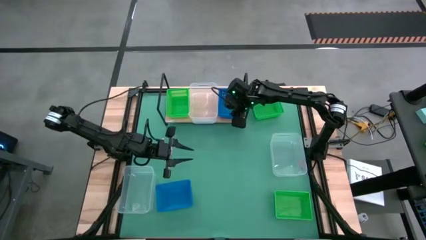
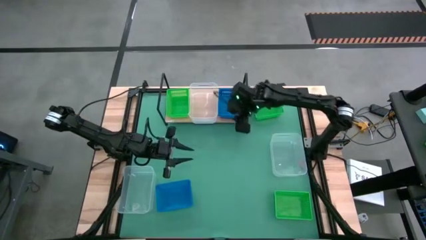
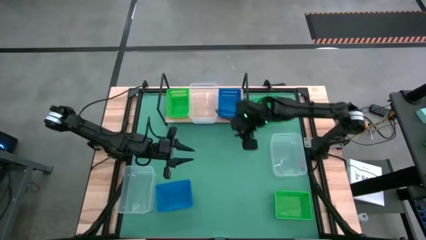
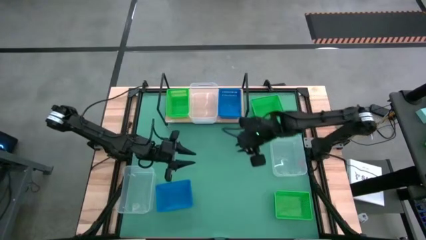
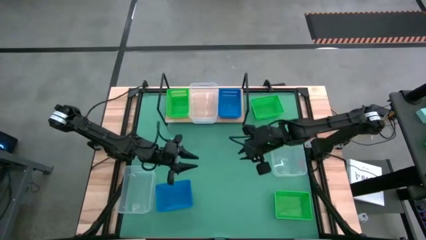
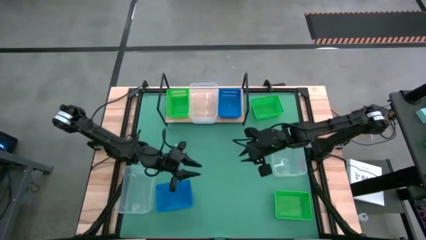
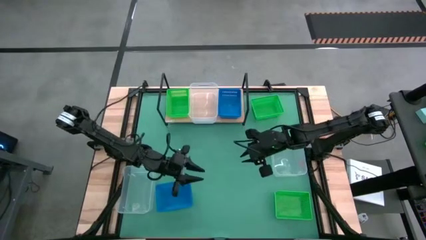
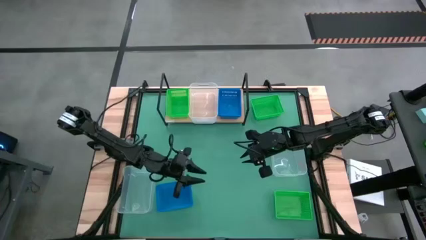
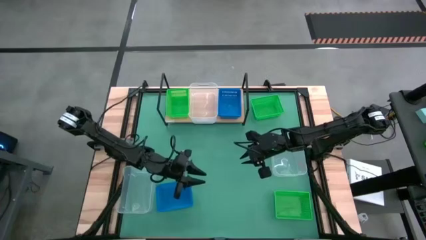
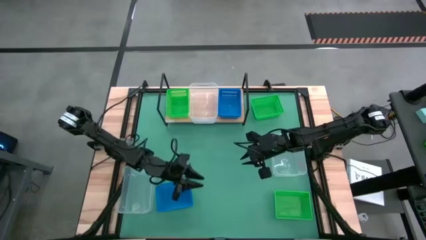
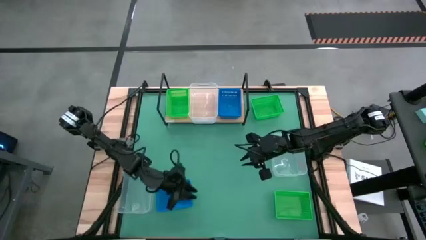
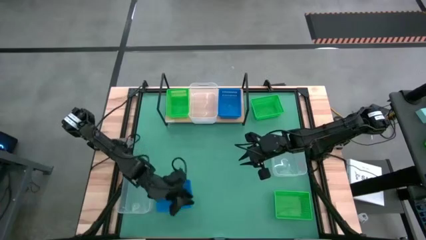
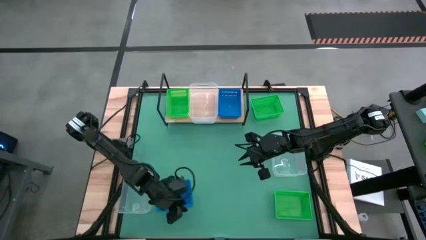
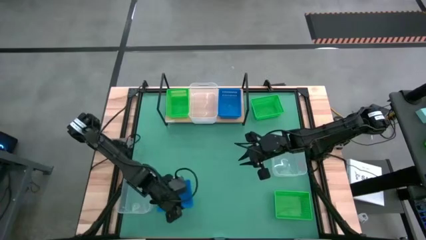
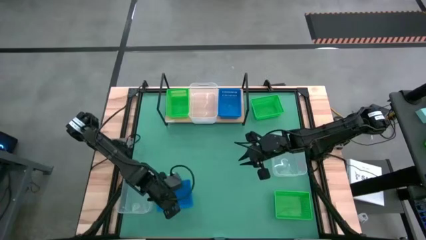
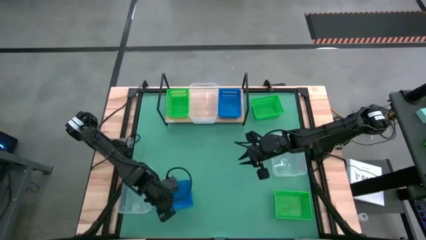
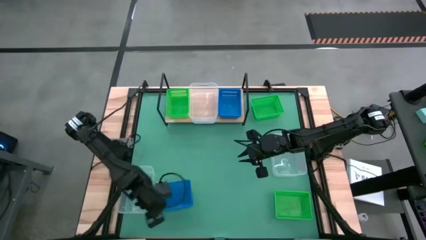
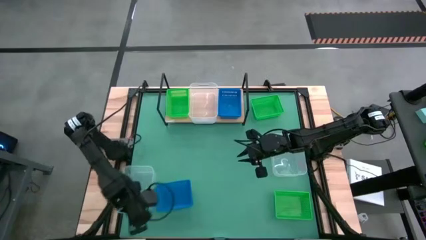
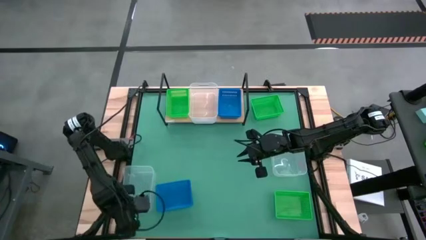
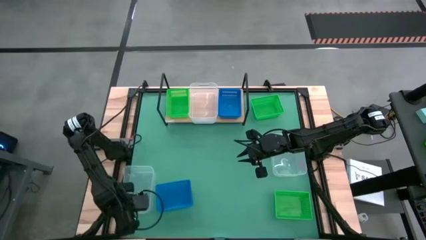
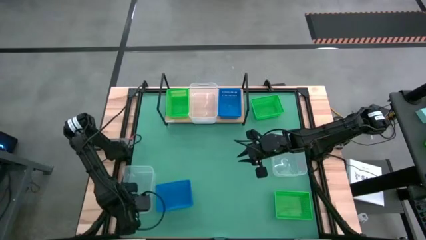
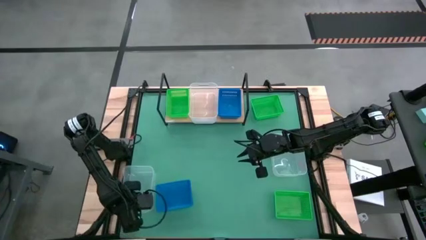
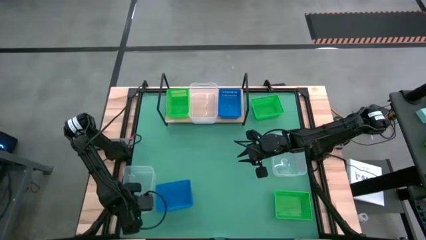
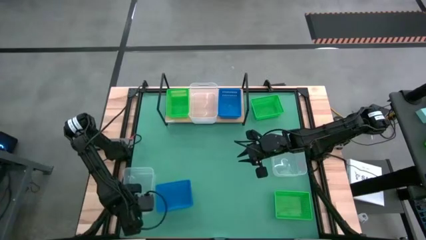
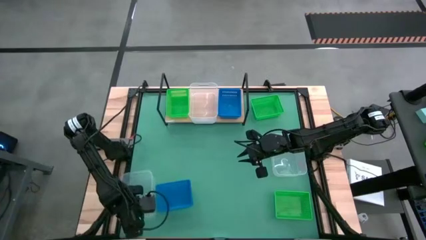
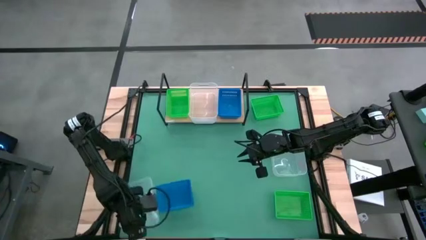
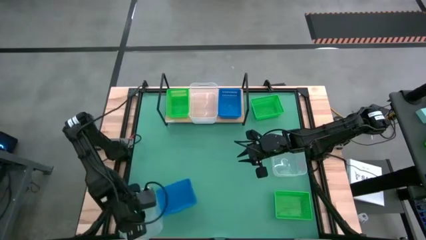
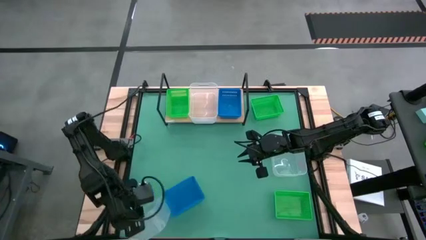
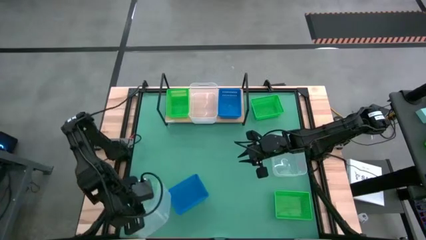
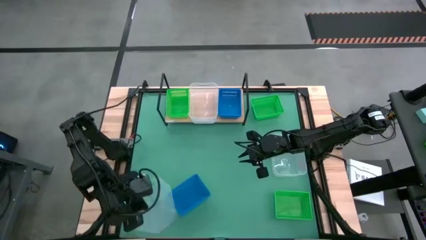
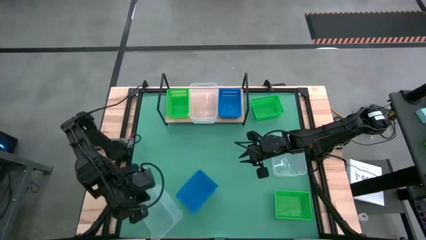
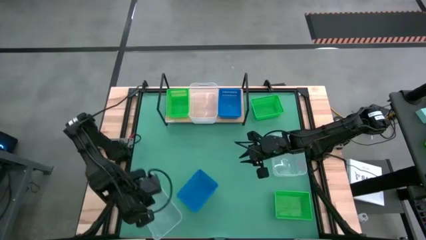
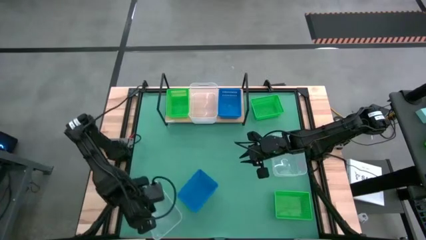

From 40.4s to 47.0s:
Task: Stack baskets on shelf by color
Stack the left transparent bin on the transparent bin on the shelf

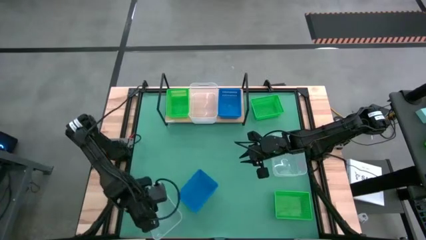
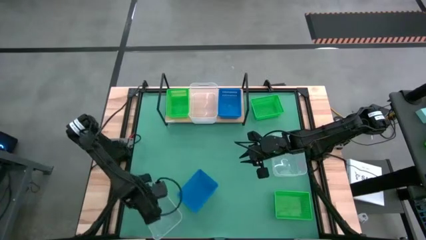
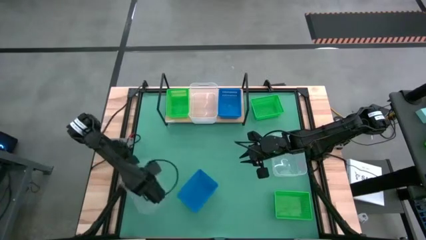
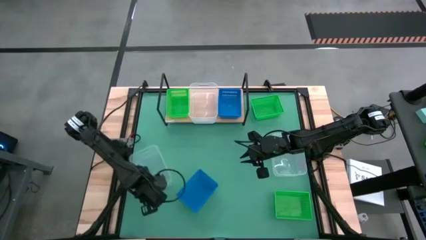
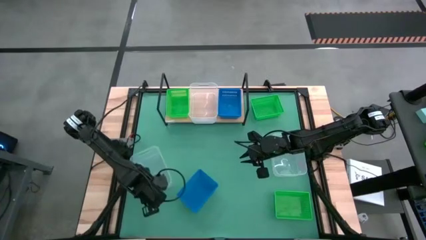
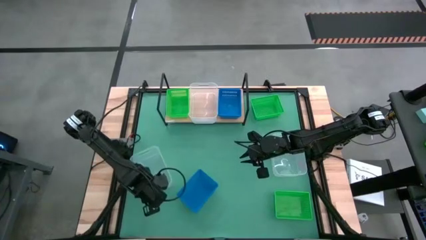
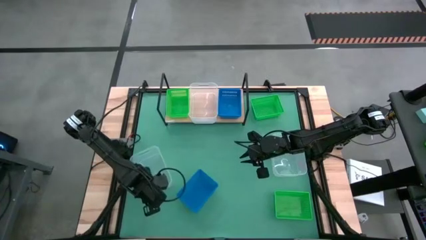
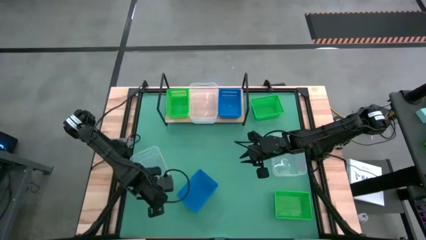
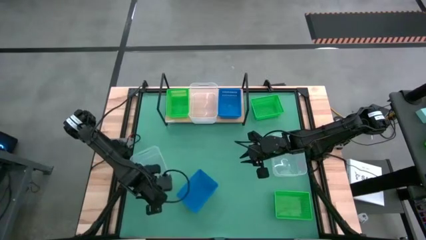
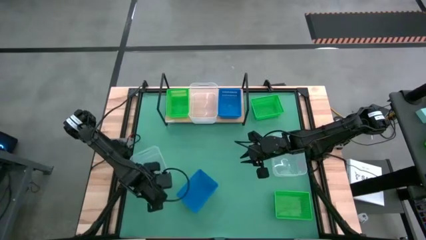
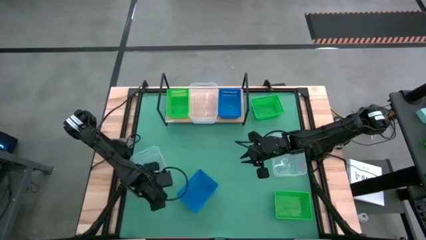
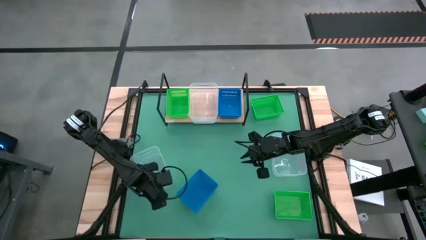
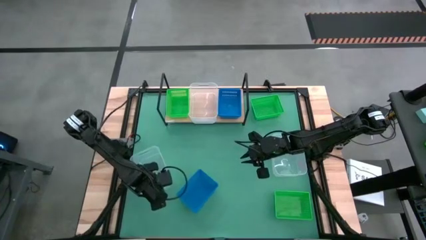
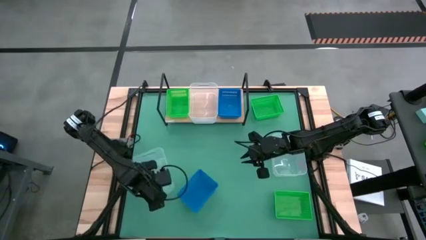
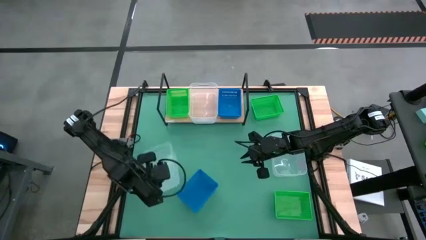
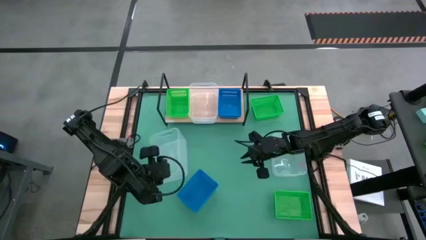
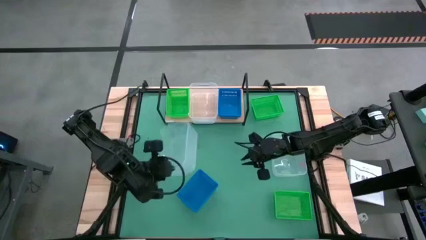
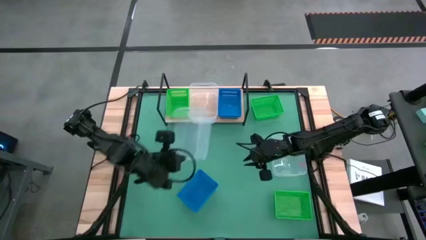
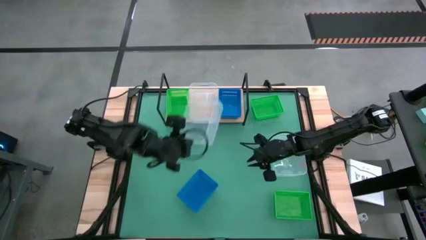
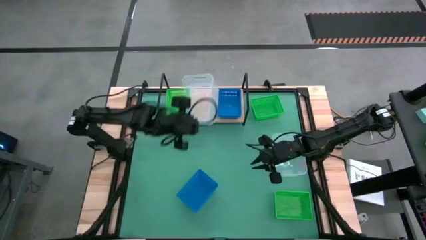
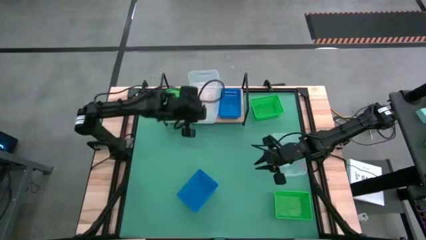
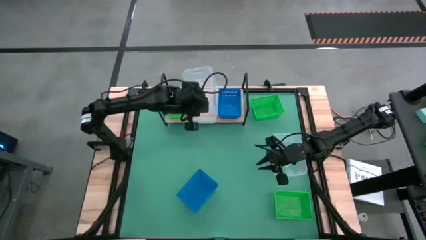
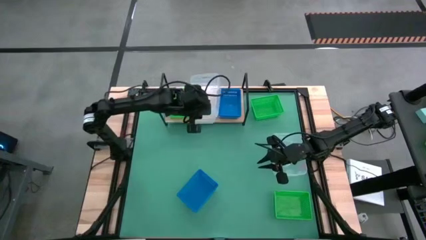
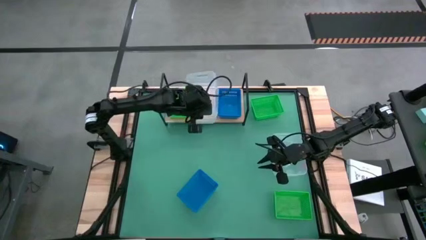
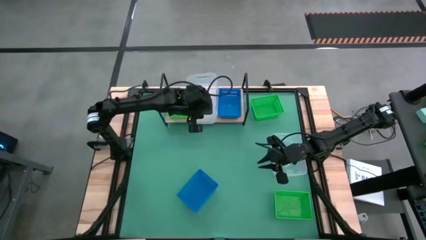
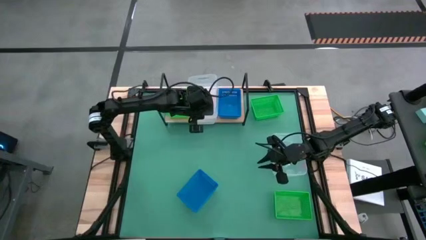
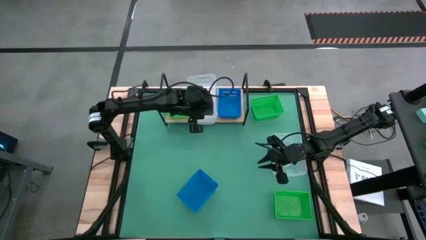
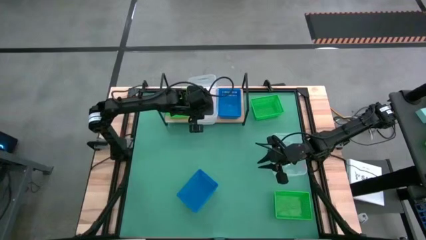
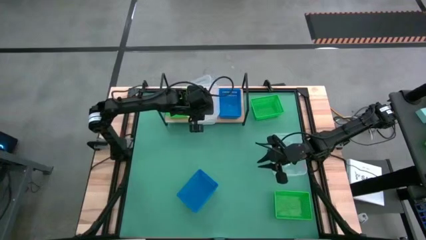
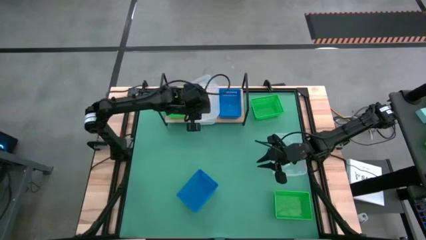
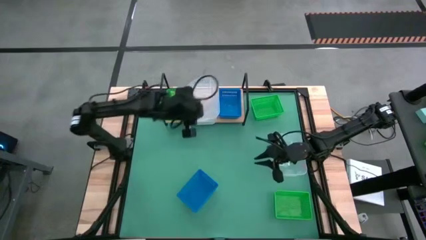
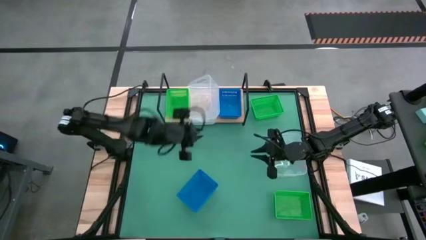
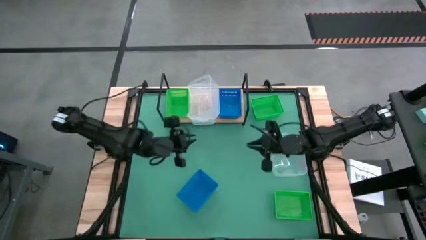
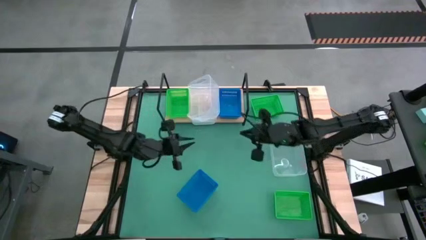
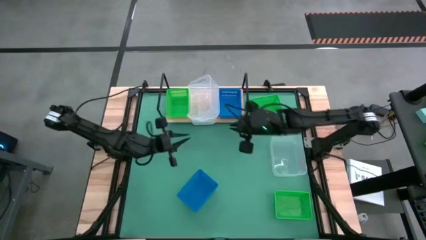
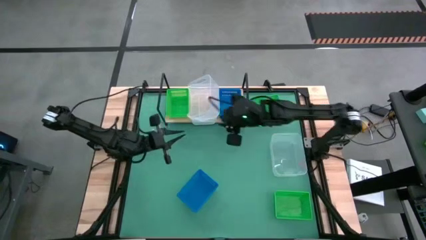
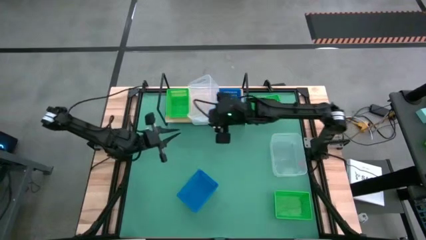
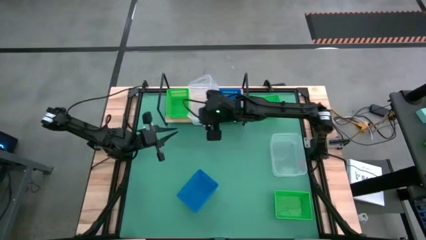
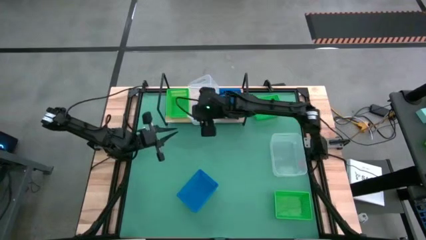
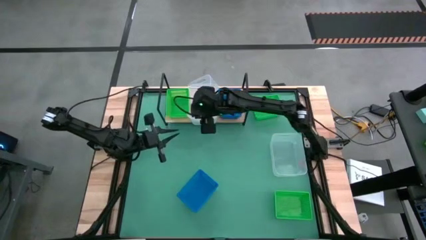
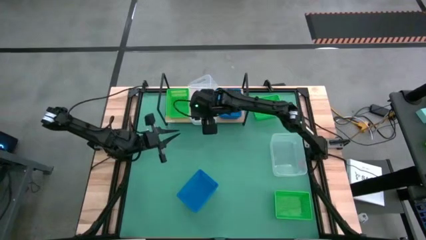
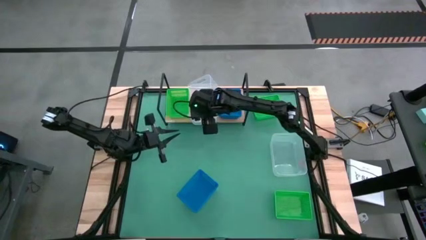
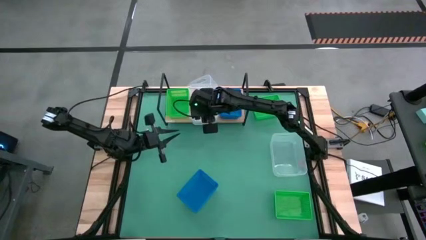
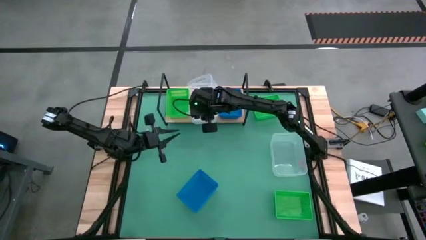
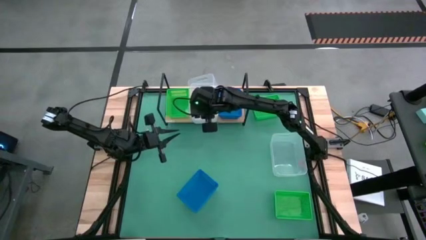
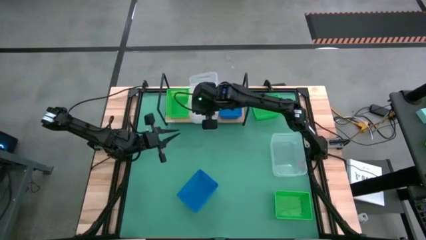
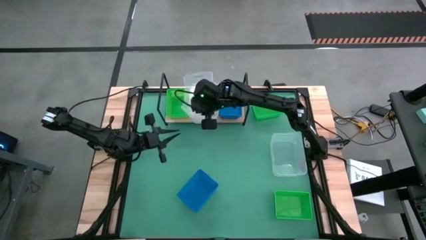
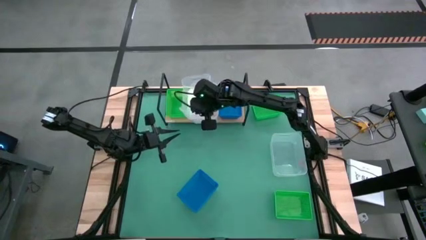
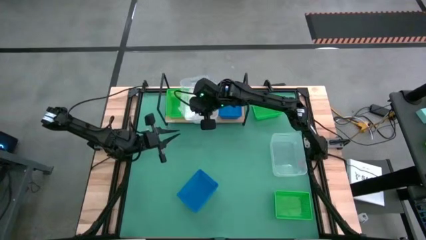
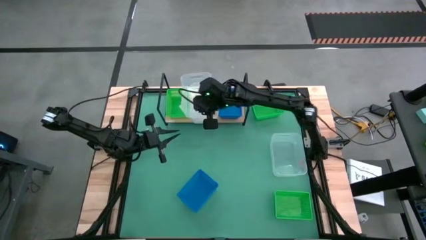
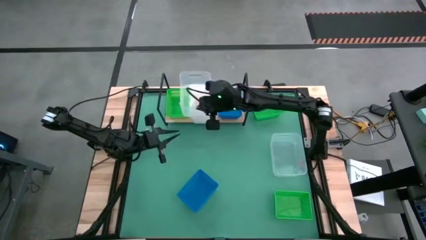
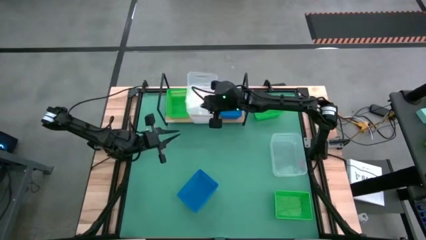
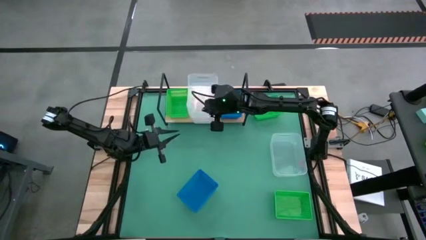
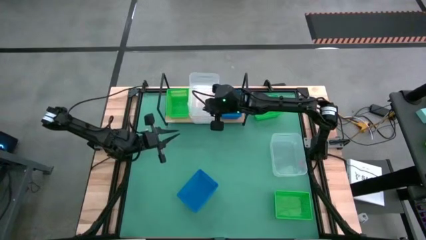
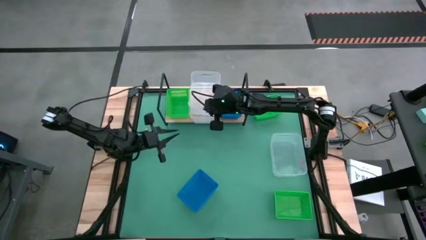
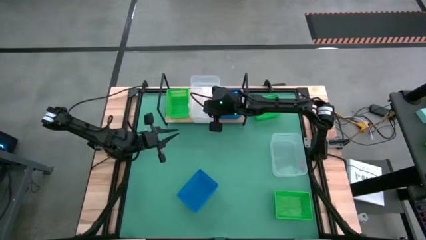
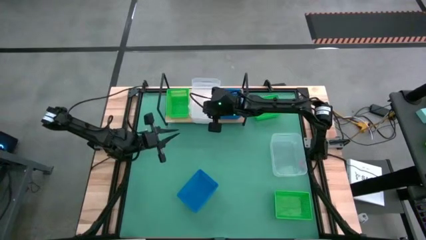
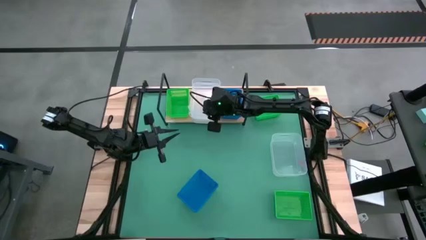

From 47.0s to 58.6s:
Stack the left transparent bin on the transparent bin on the shelf
